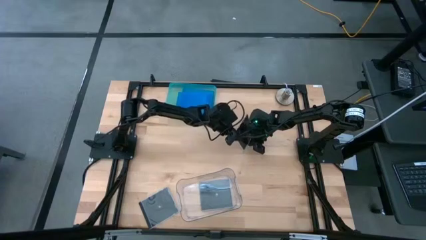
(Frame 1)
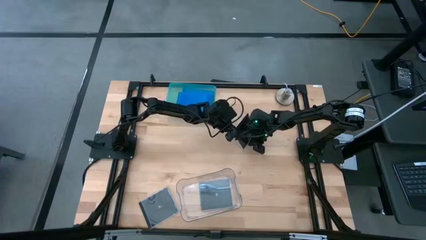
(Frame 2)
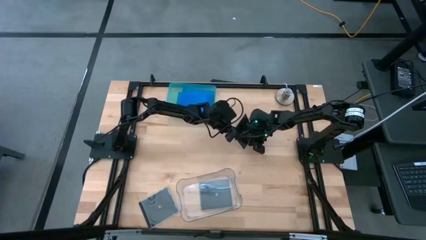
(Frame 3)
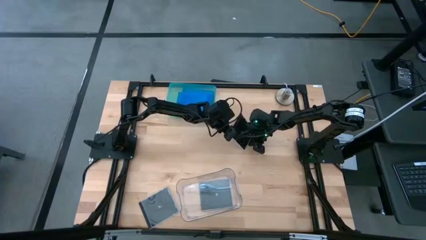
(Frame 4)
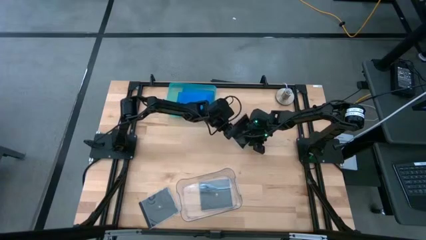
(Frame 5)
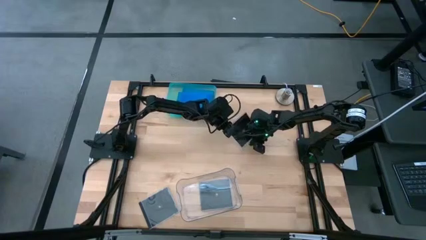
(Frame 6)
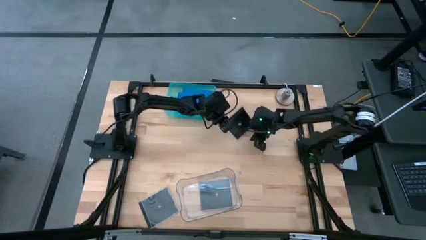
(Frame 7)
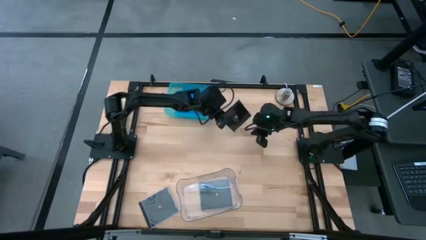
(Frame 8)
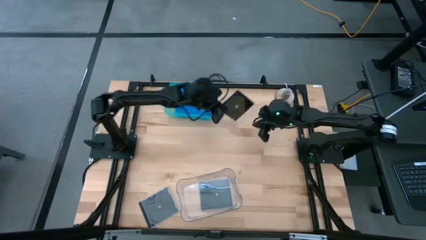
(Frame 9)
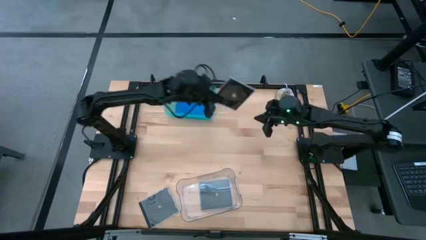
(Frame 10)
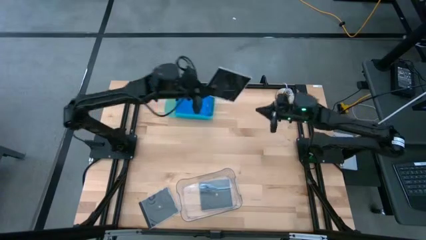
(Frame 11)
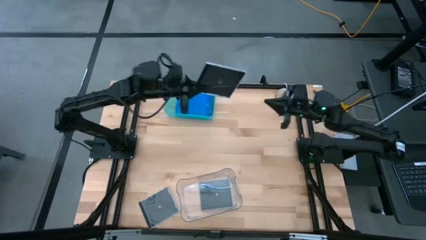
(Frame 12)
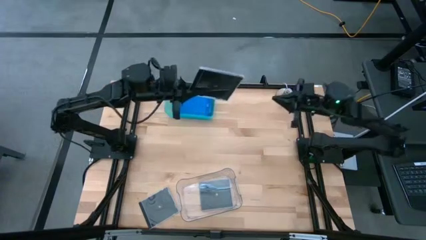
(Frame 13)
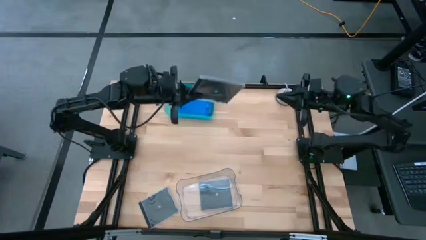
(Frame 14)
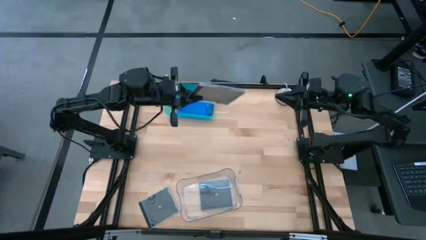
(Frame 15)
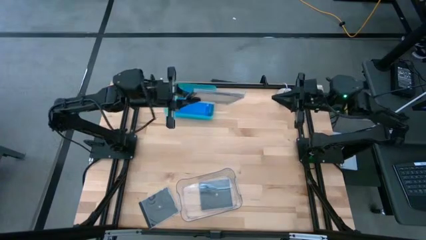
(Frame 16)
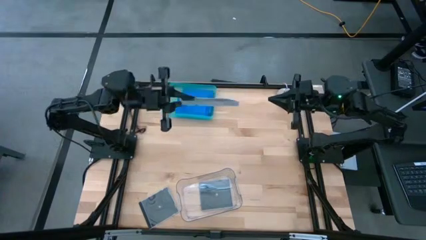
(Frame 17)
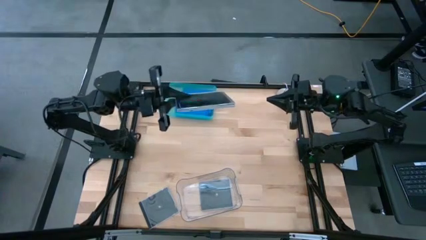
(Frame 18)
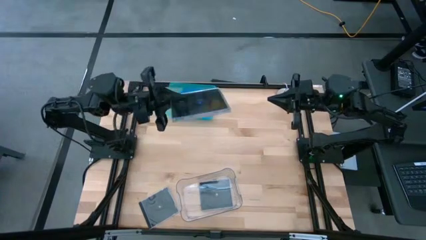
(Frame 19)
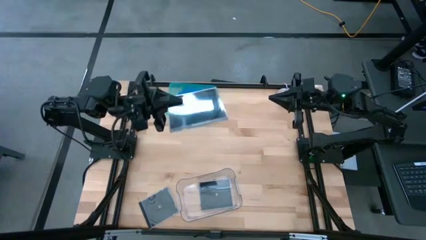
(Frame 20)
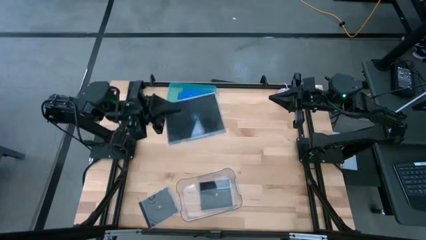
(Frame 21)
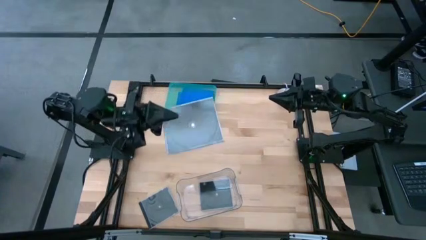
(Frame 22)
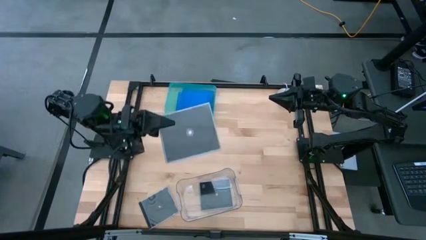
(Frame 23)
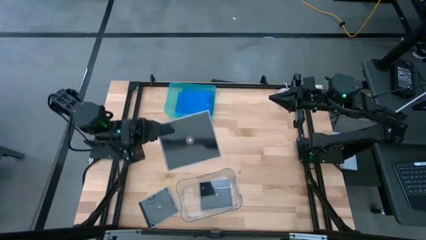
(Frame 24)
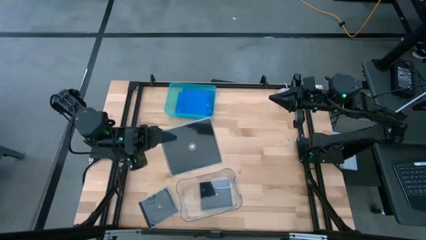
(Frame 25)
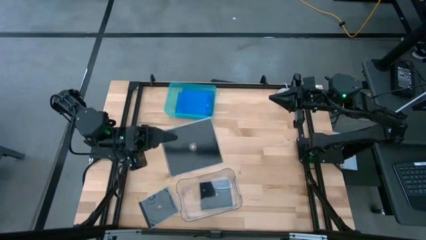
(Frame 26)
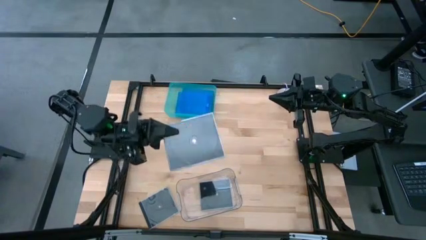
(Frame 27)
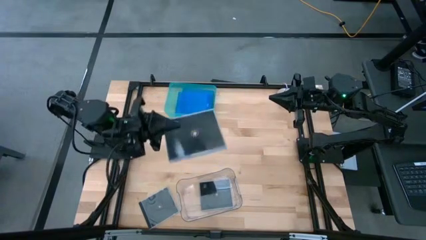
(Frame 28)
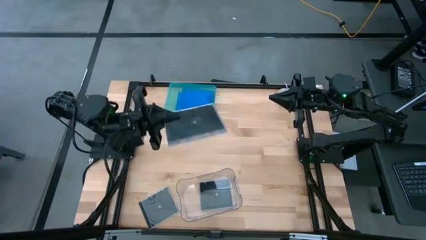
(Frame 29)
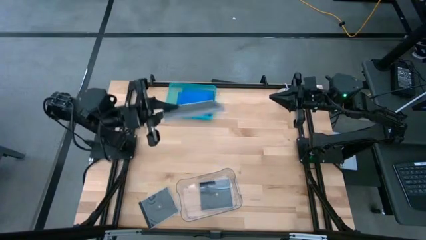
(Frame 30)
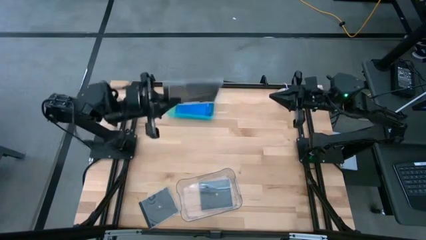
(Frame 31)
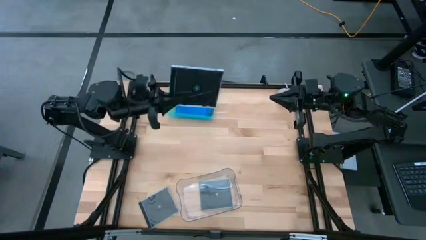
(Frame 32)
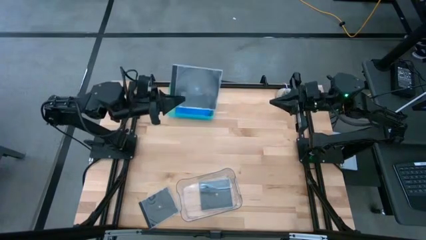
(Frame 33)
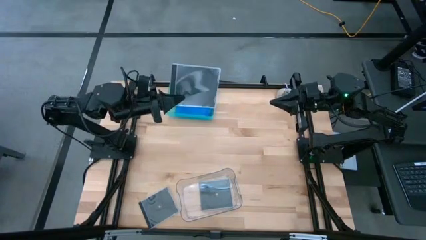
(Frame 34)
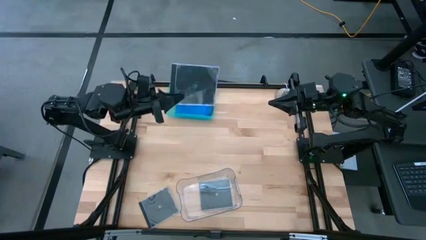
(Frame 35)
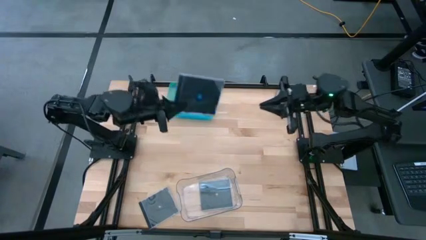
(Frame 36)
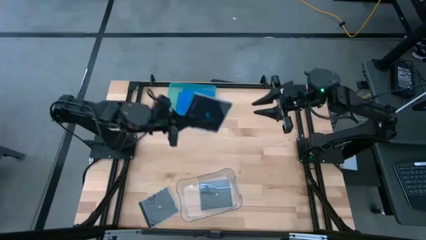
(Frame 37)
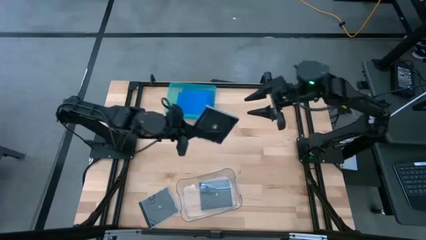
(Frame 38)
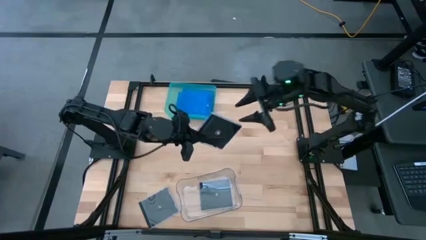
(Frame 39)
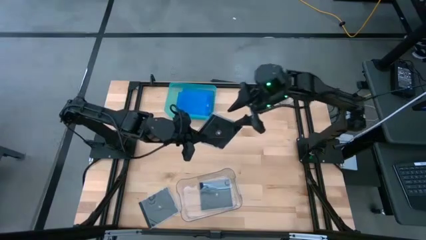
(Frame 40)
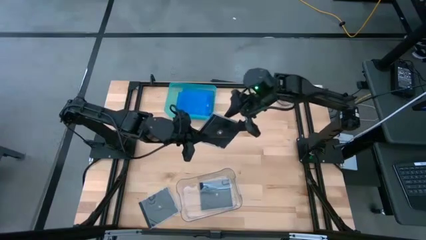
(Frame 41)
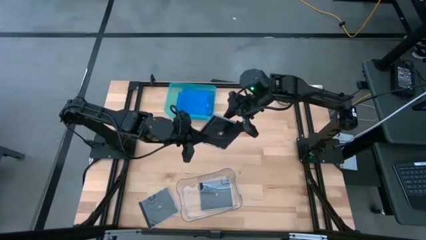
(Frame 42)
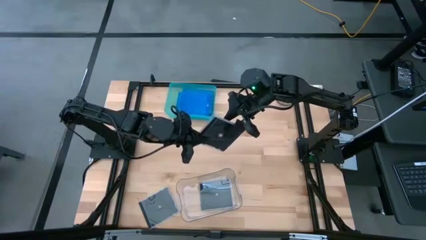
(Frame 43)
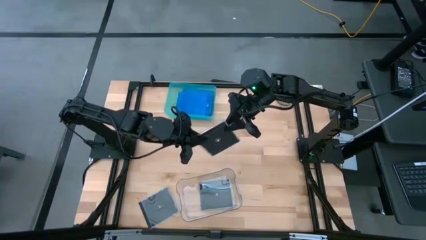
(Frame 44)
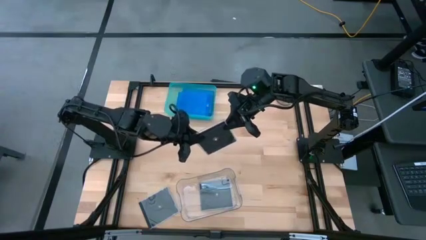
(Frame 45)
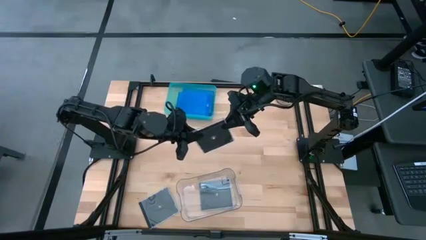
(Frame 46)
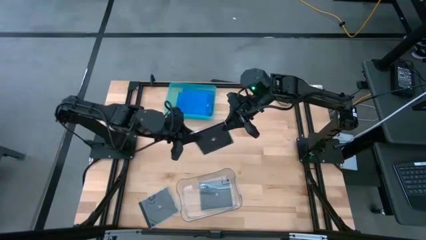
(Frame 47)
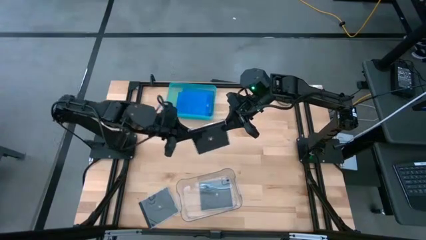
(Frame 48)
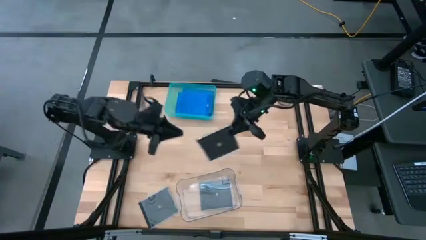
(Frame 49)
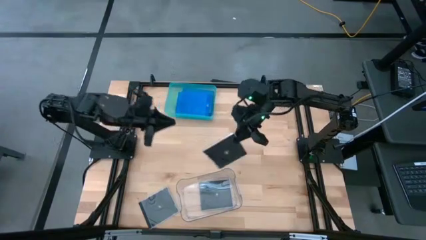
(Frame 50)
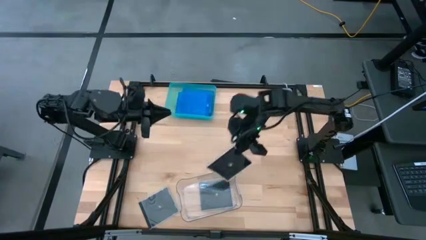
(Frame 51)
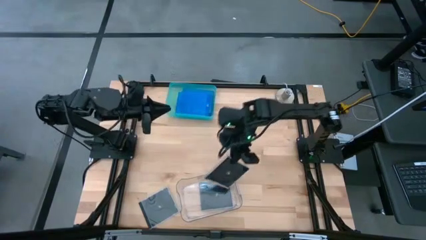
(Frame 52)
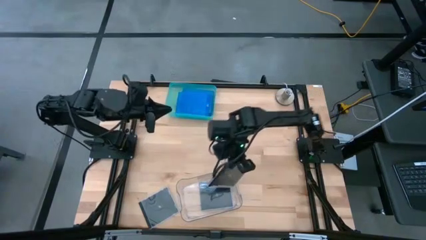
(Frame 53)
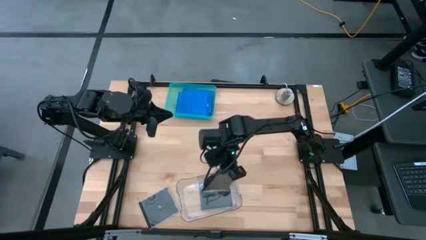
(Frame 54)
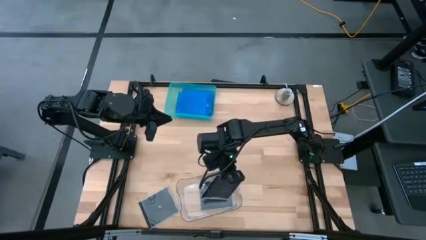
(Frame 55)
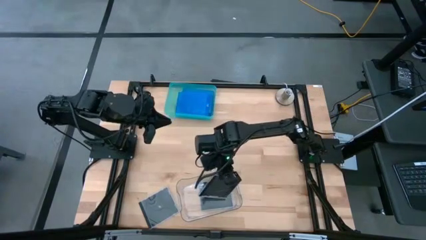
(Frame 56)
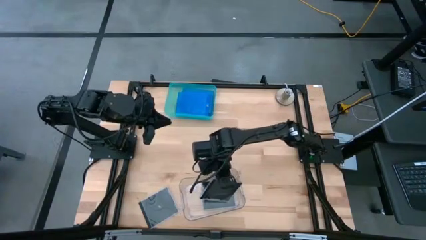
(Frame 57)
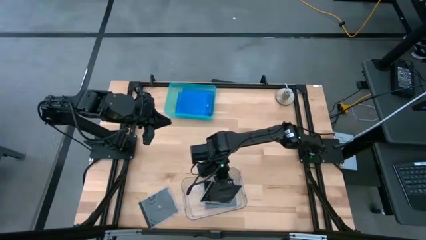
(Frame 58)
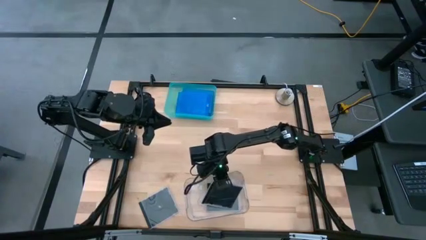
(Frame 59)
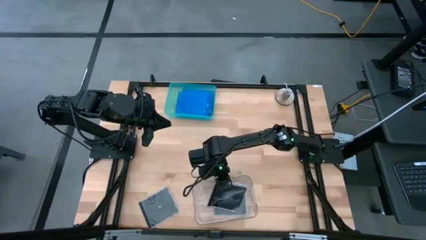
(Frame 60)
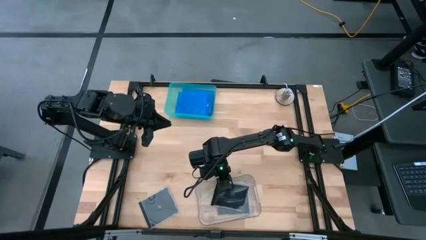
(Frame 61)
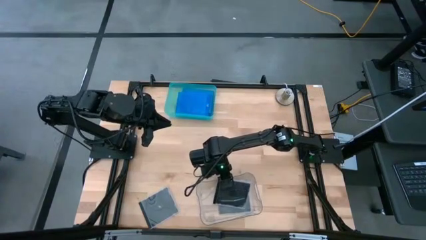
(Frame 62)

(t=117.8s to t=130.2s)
Task: Pick & place jewel cases by type
Put the top black CD case into the transparent bin
